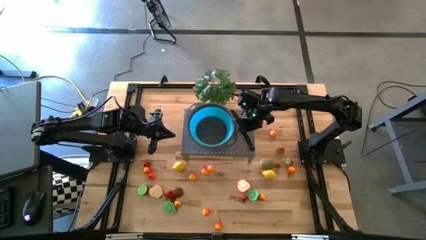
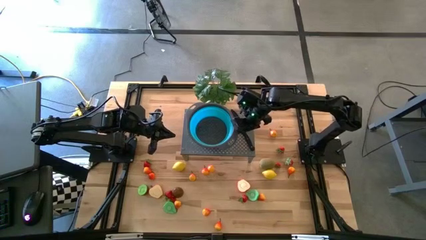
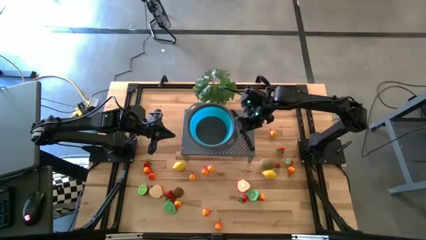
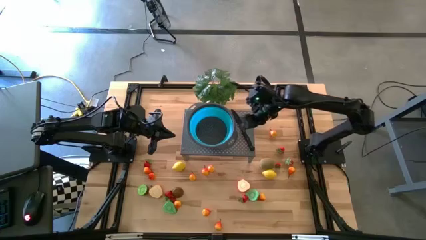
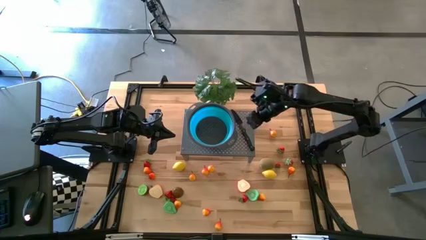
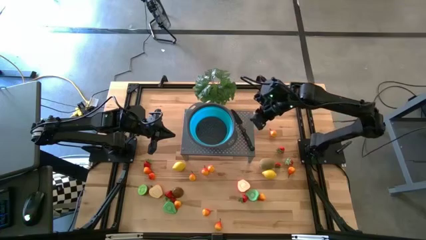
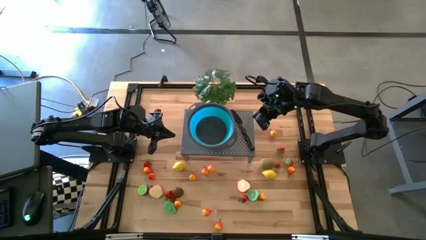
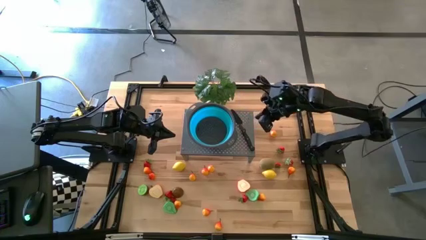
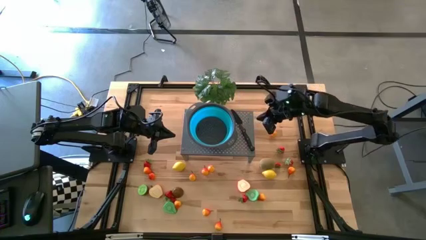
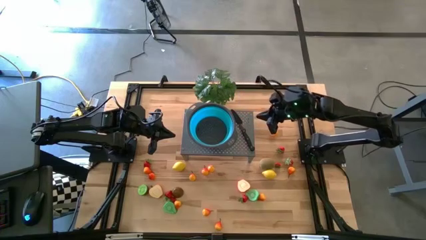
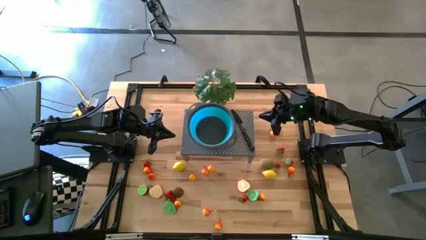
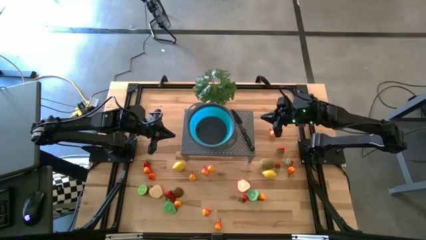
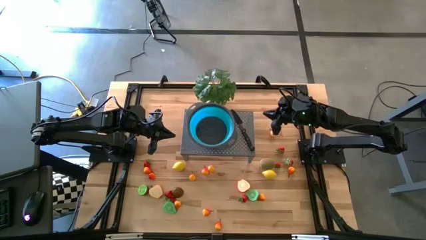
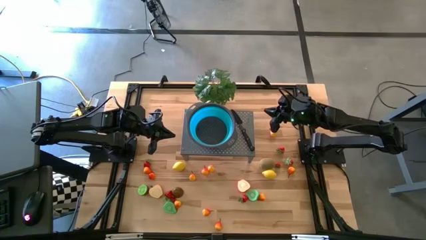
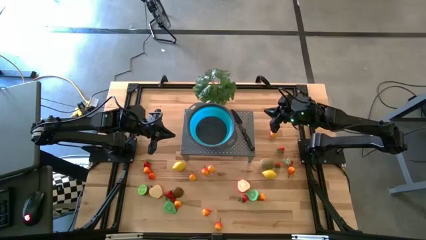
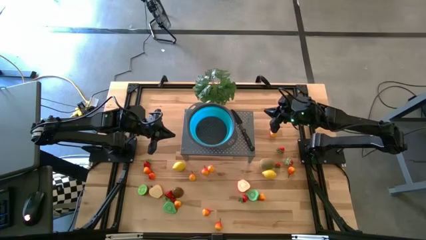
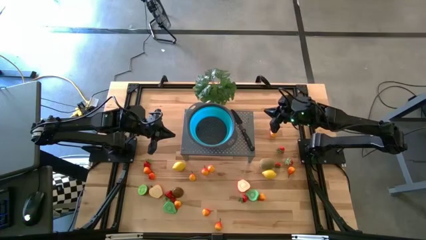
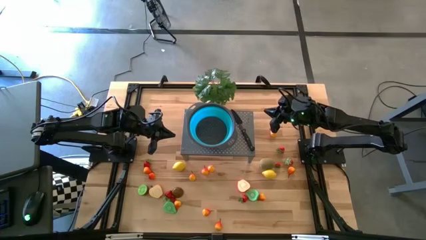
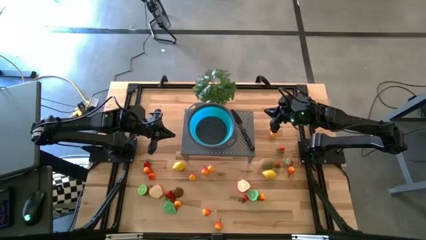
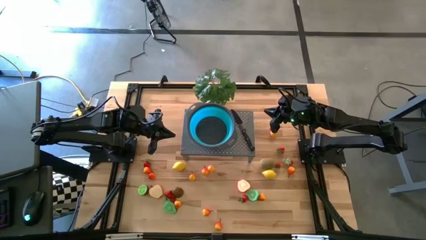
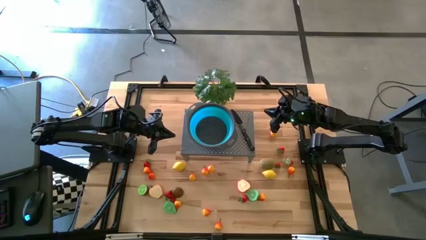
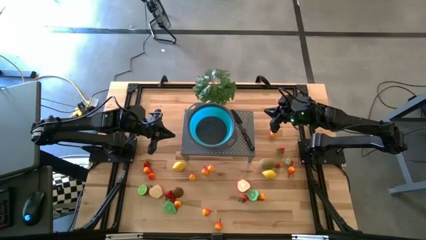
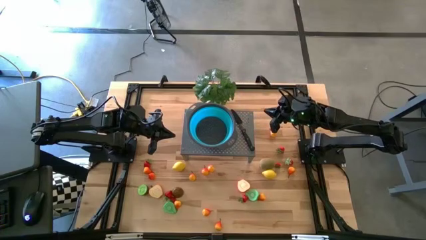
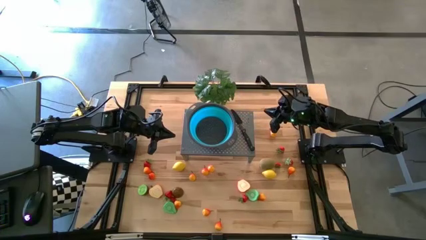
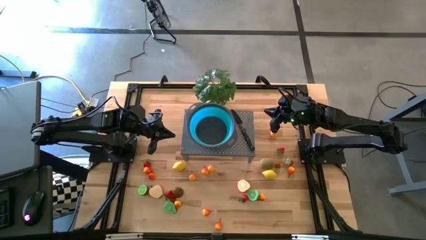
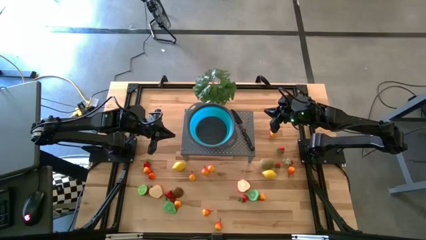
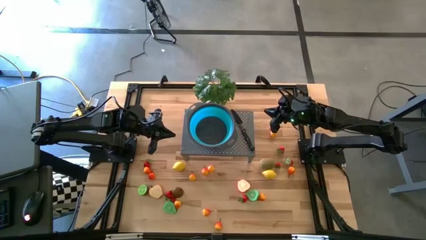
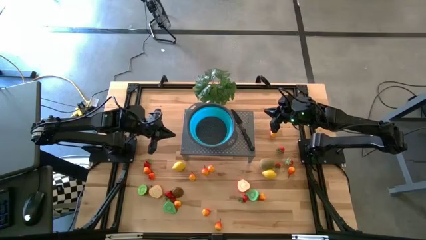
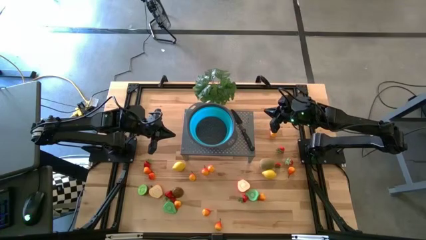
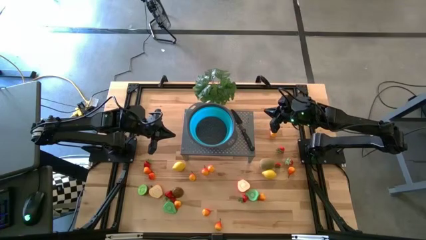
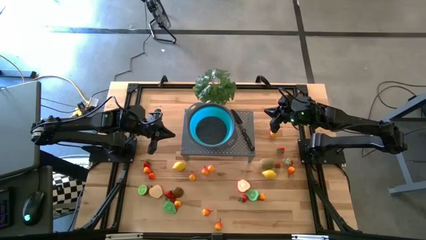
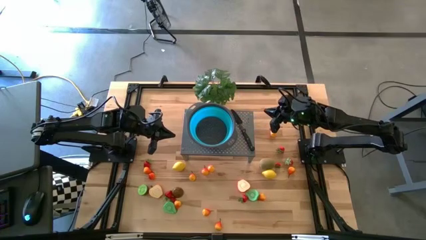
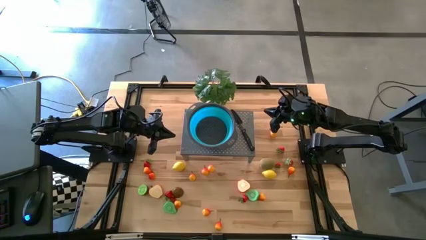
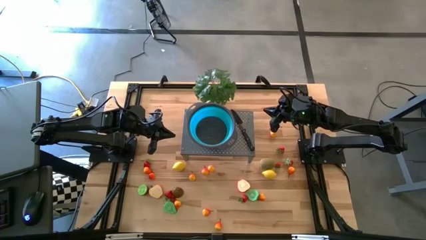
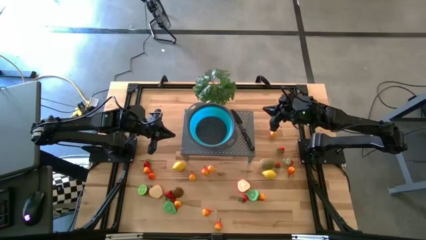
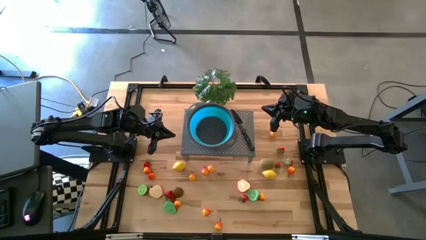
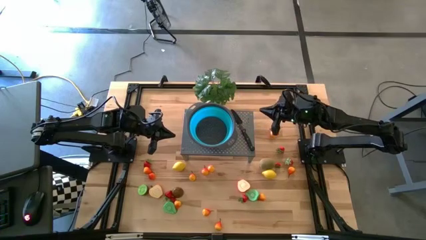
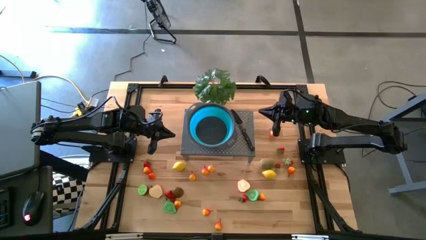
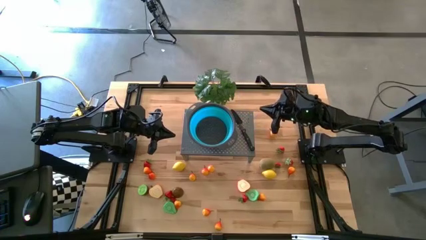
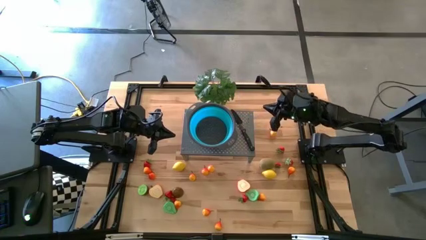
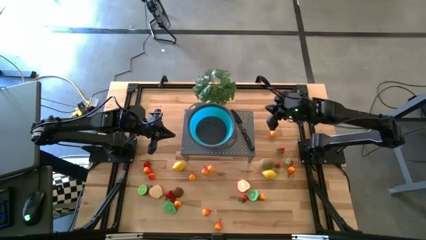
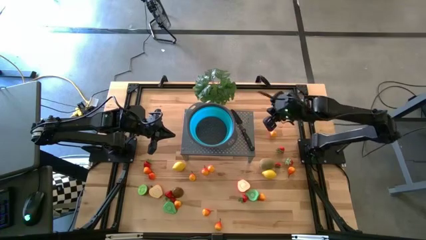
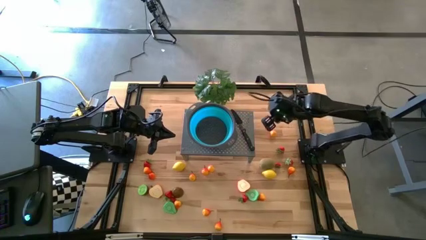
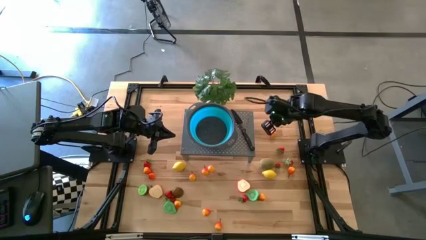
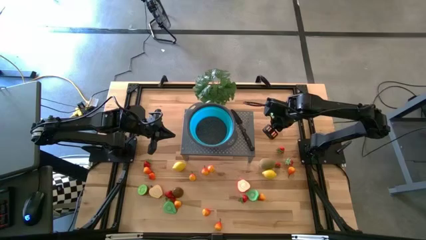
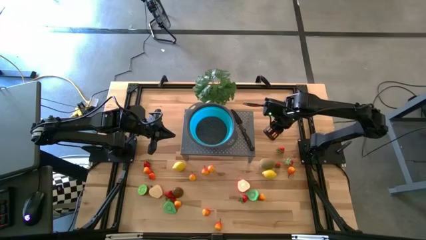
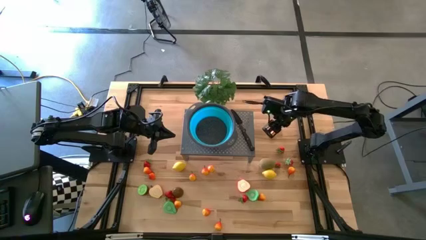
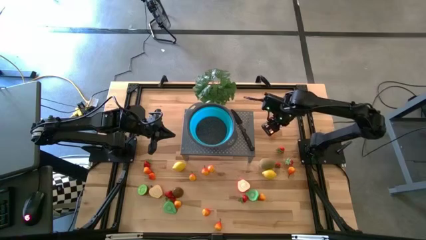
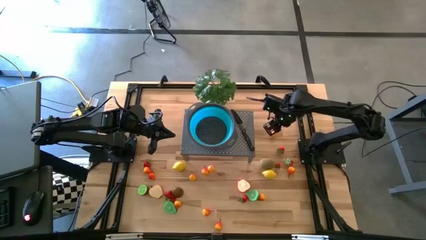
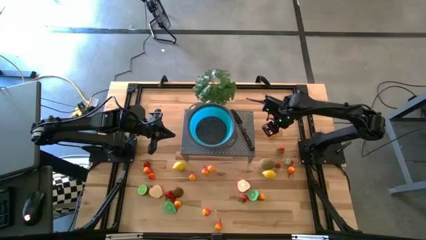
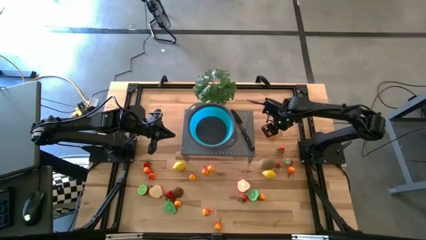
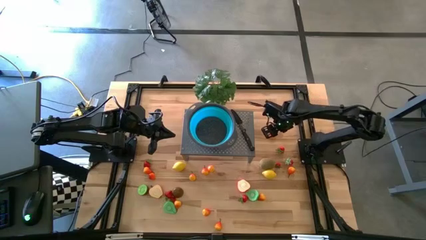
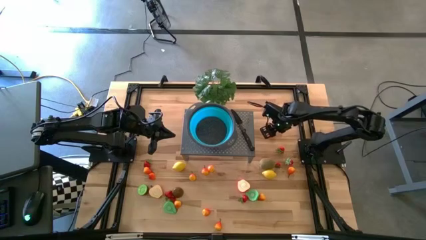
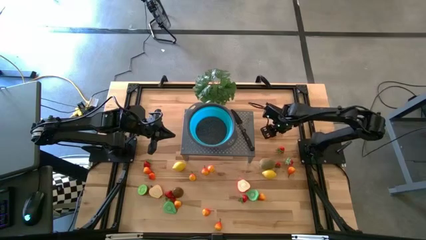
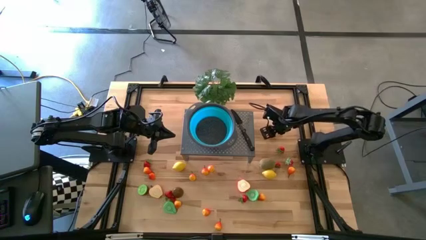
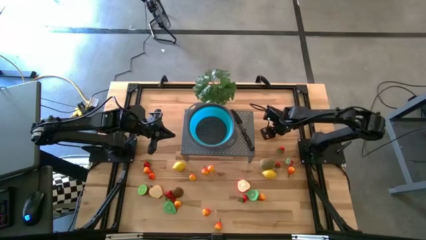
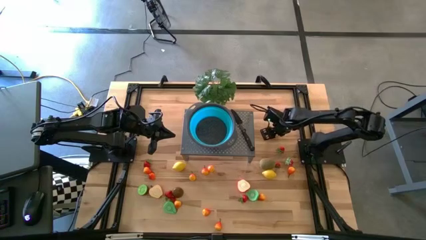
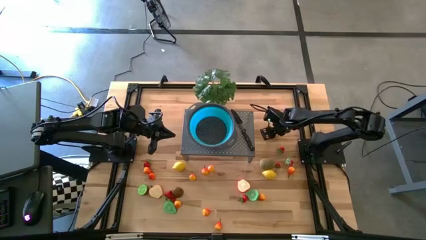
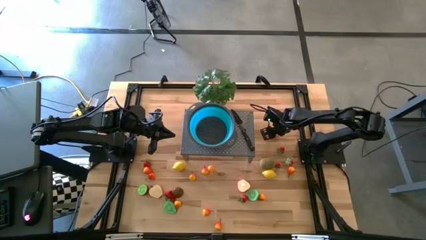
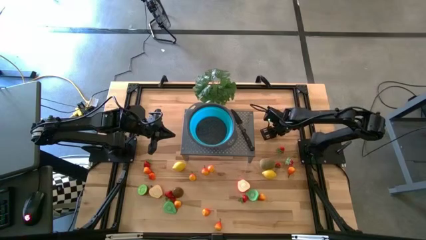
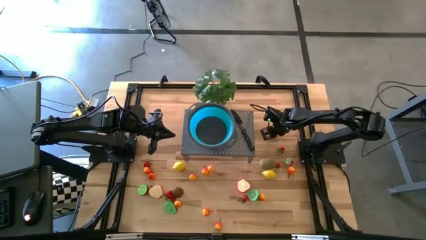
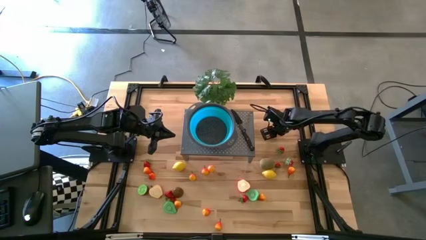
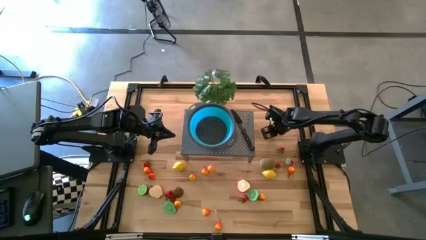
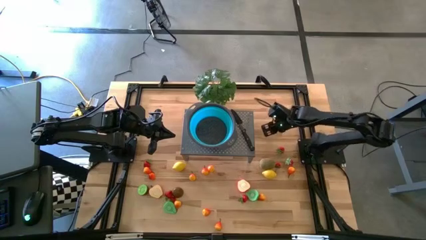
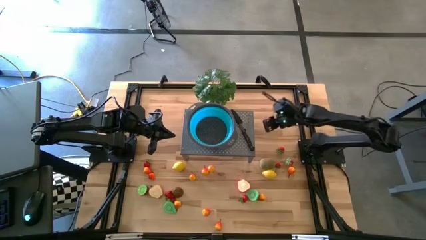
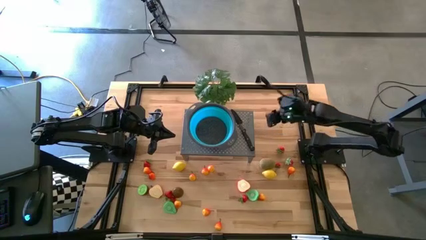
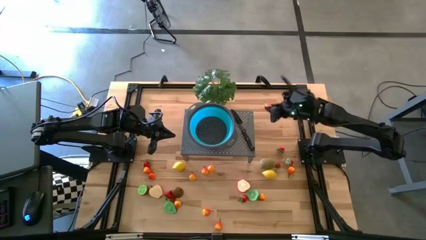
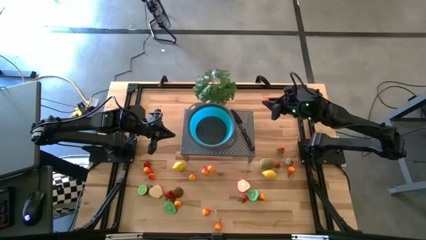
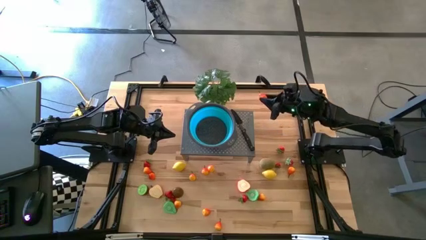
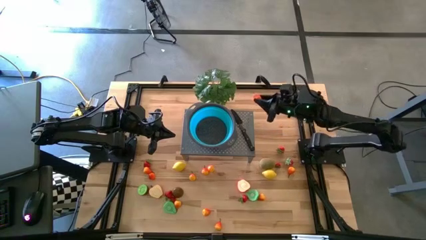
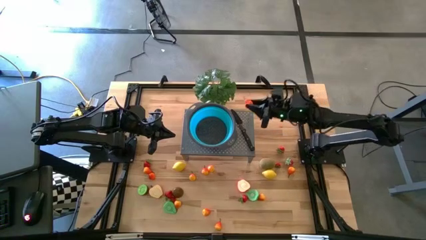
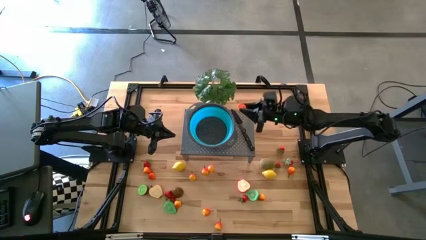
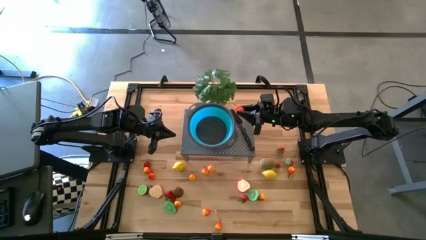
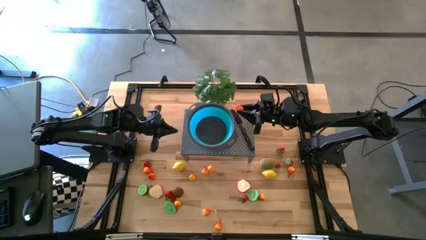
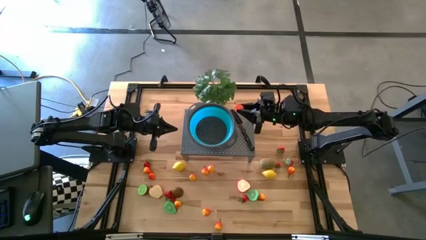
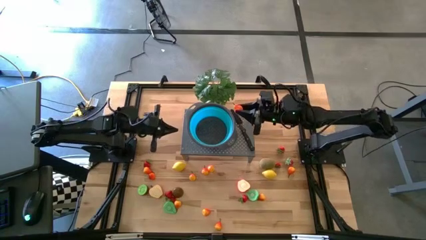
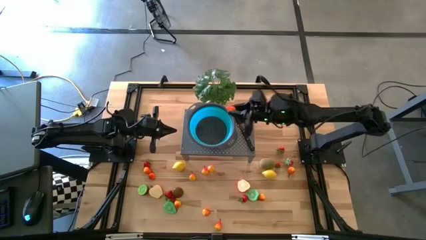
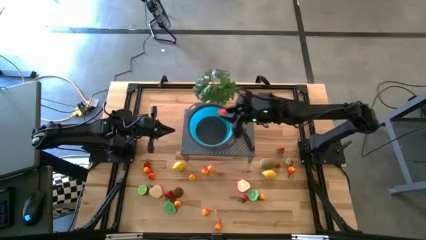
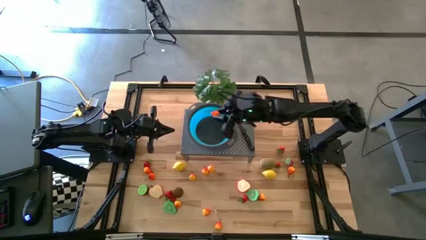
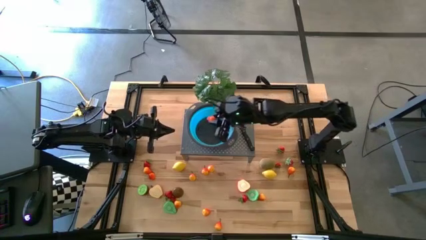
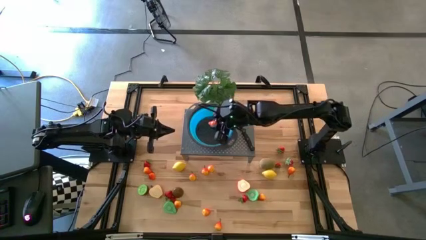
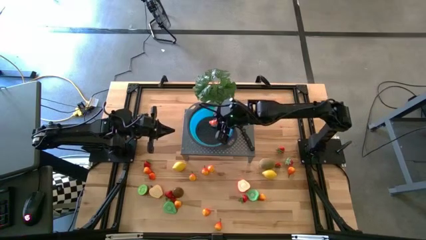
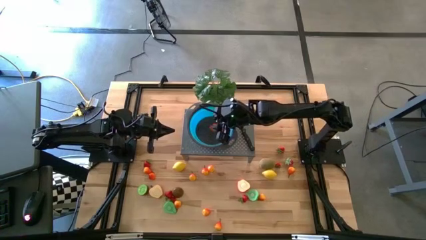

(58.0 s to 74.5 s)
Task: Pick & Place Fruit
Put the pear into the blue strainer bowl on the shelf
